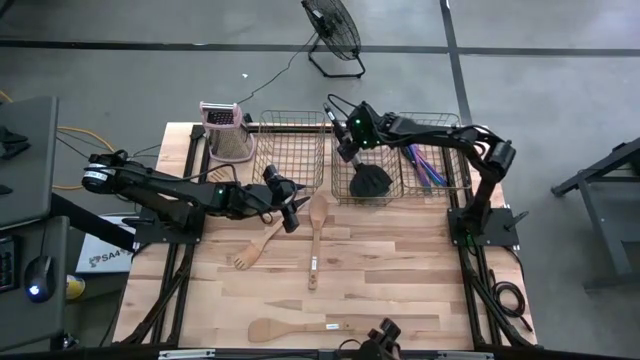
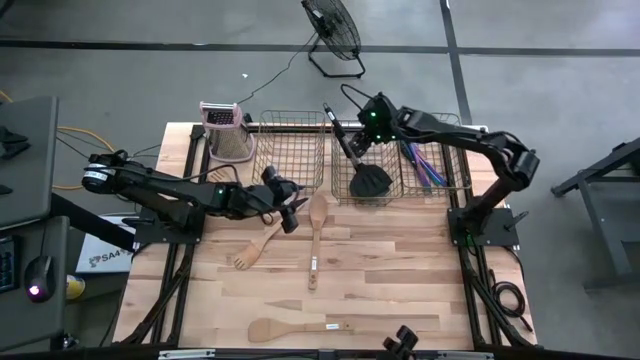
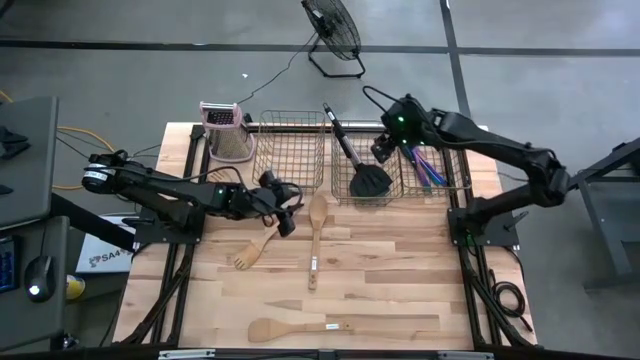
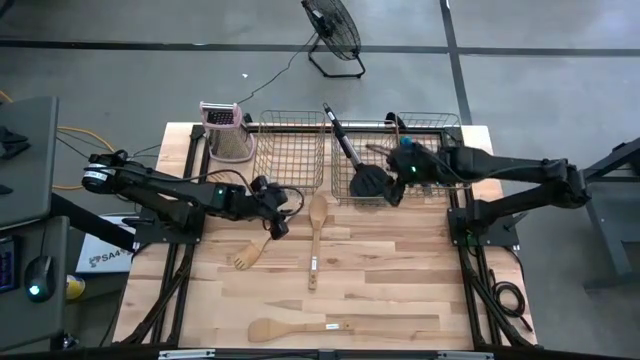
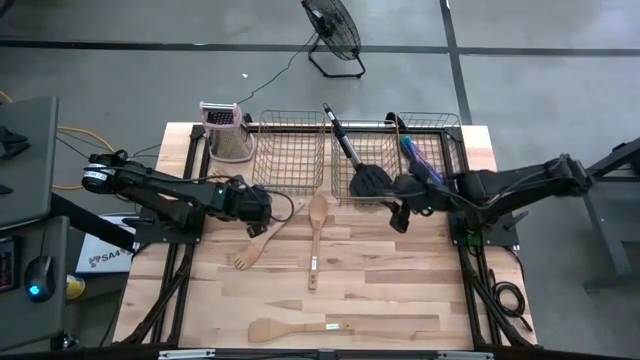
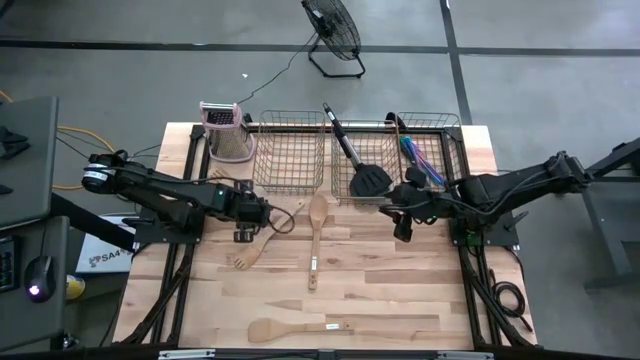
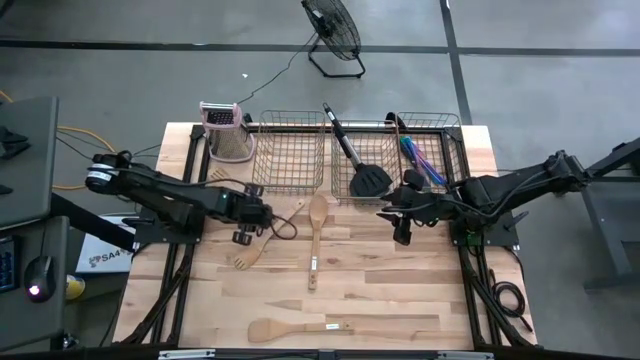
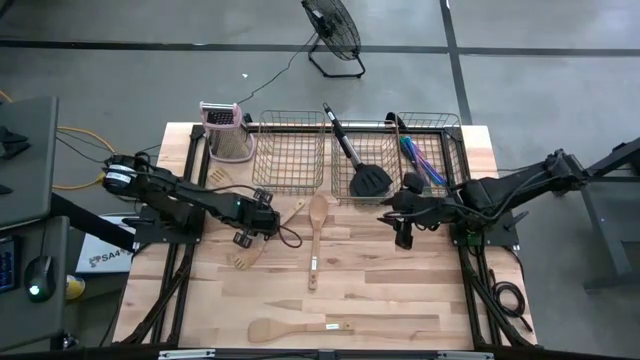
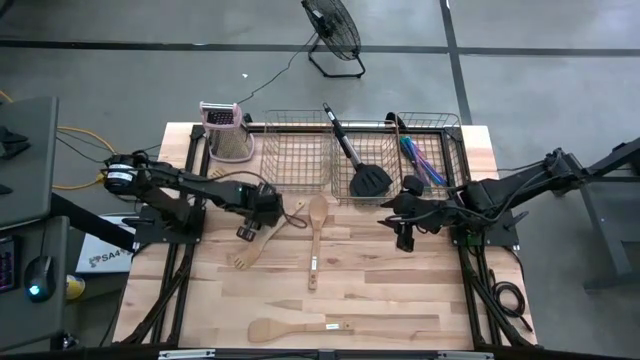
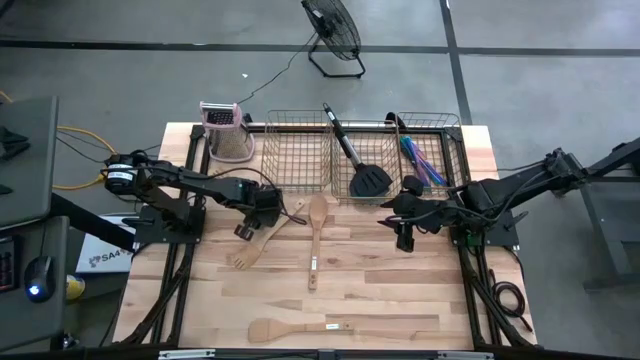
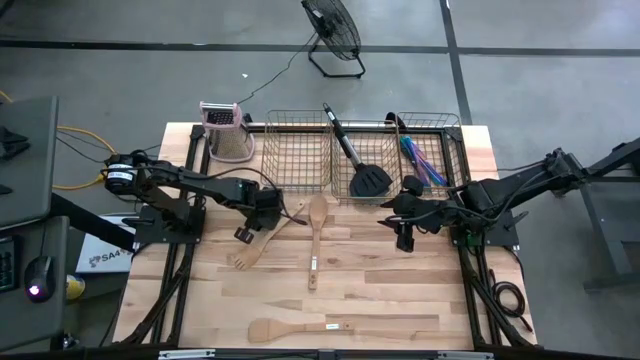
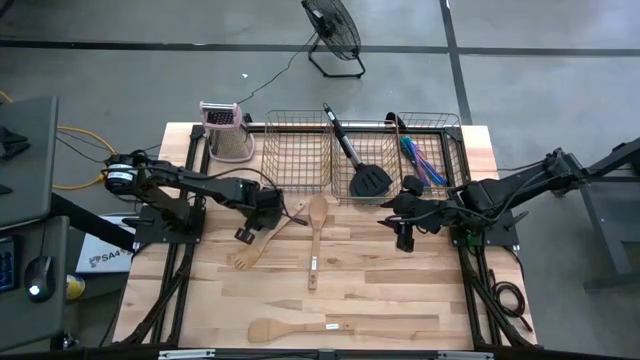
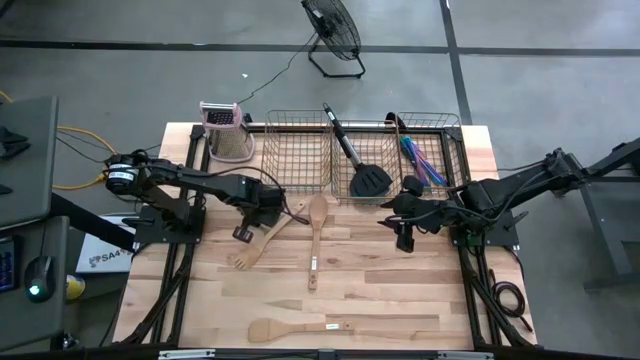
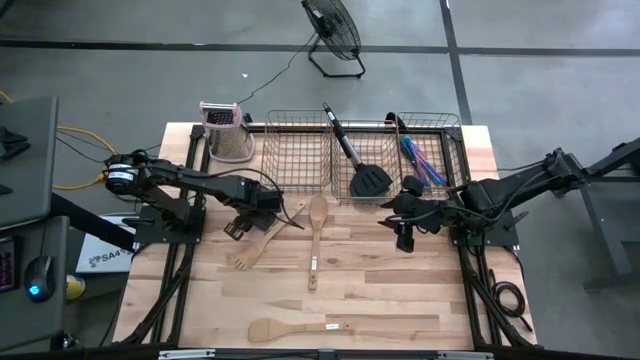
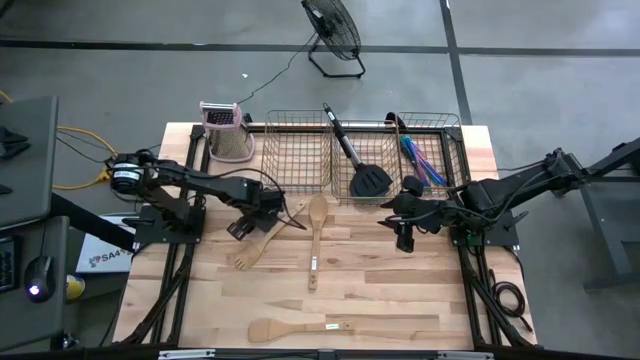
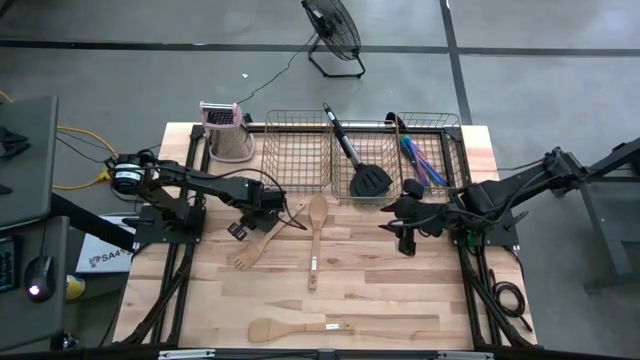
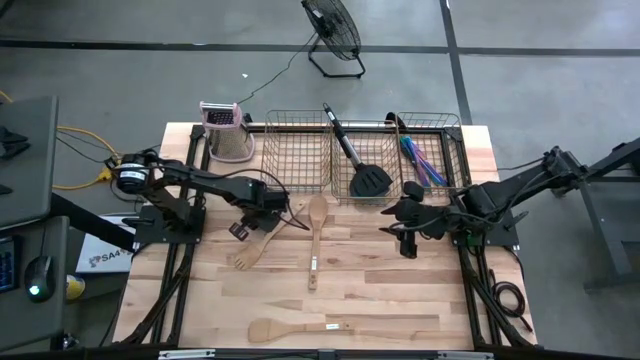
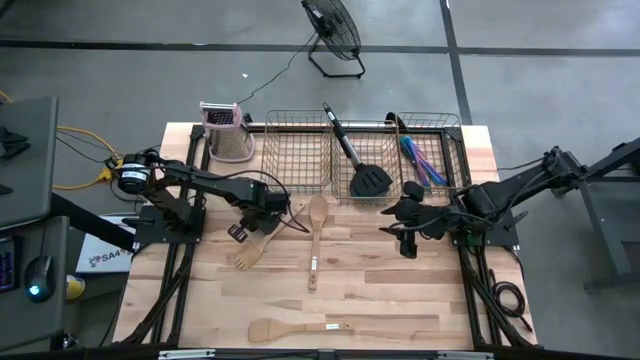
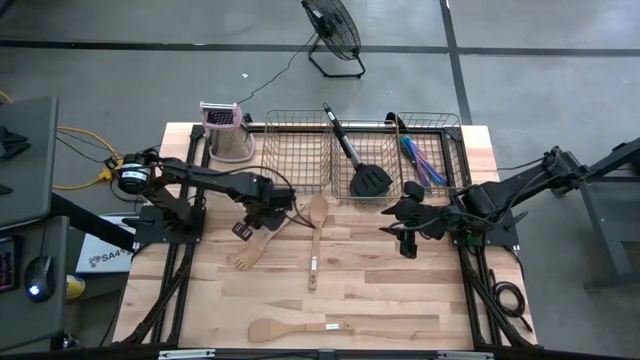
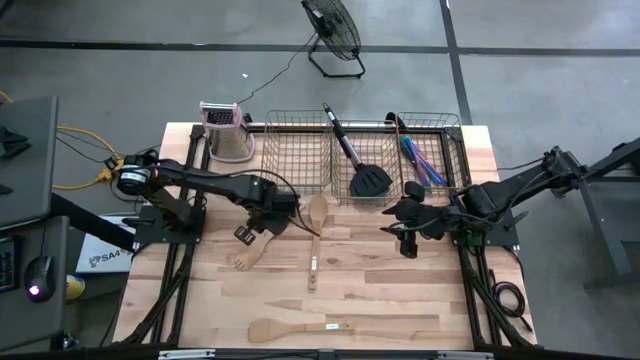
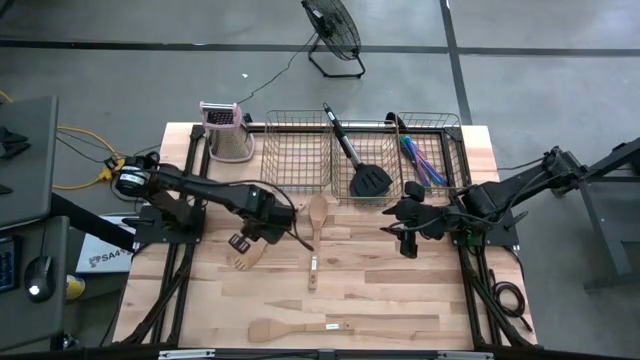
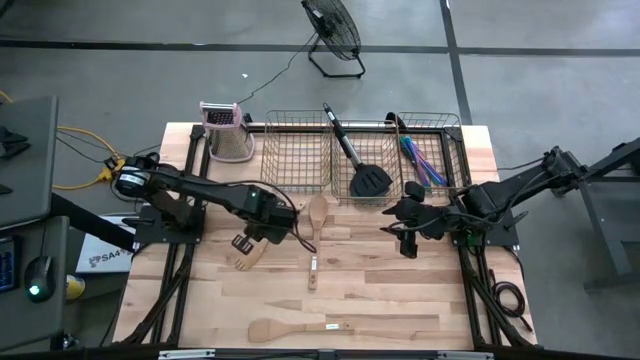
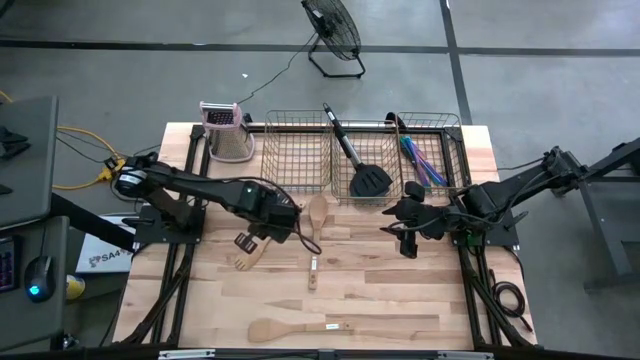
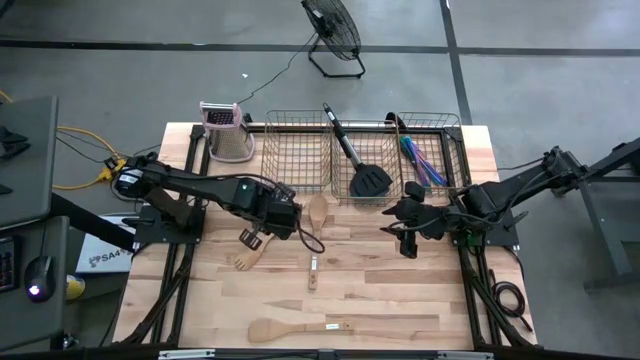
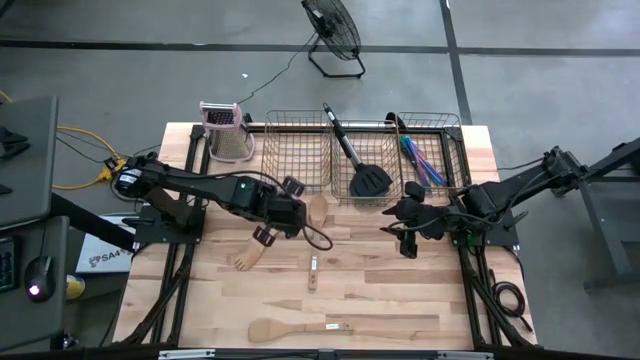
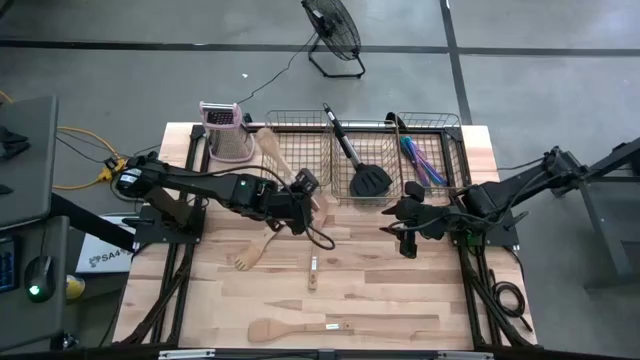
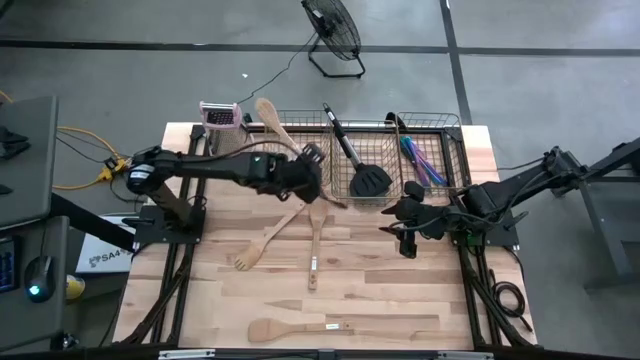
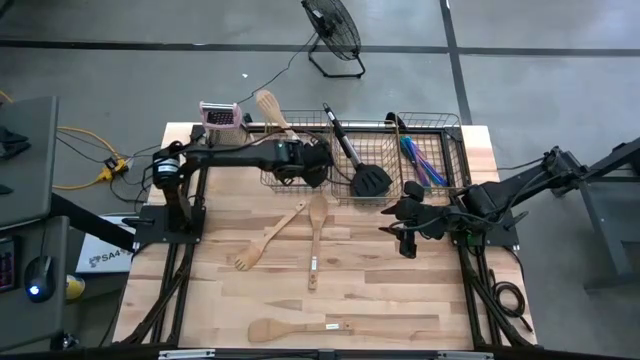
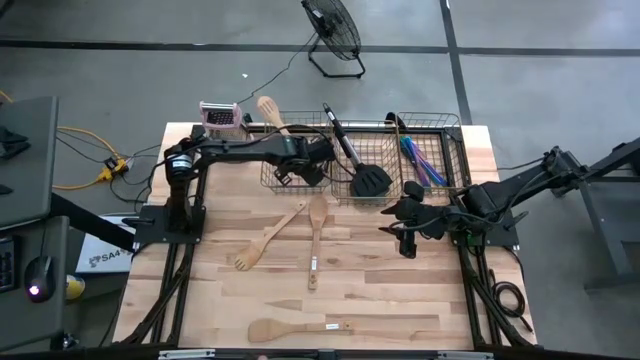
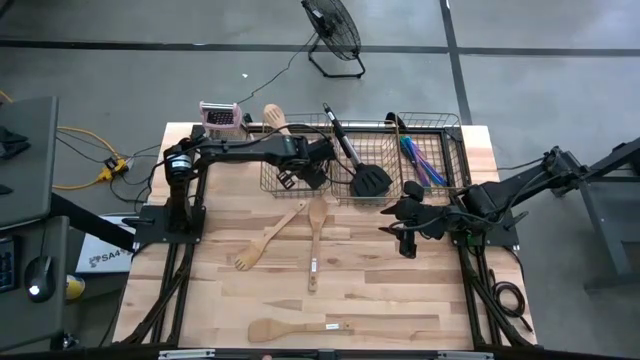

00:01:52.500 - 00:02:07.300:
Task: Pick & Place Kitchen Items
Put the wooden slotted turner spatula into the left mesh basket

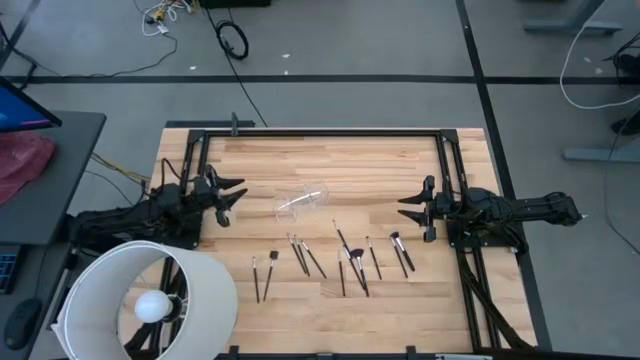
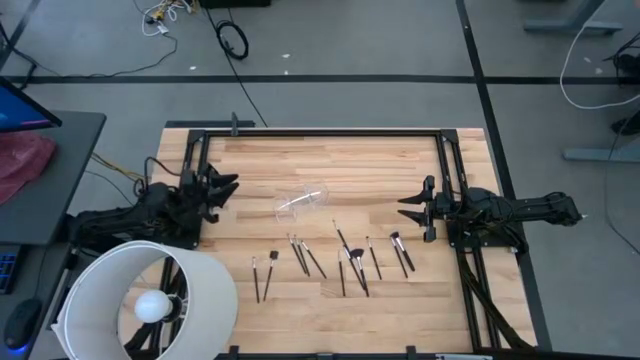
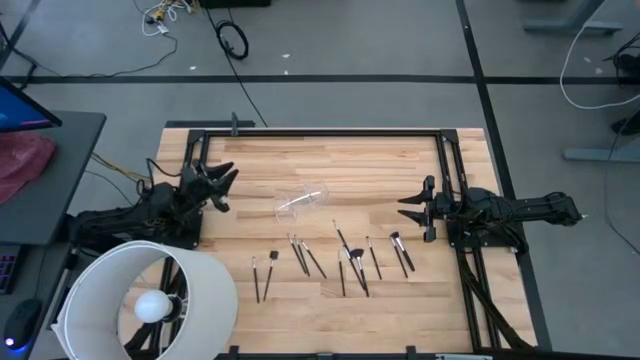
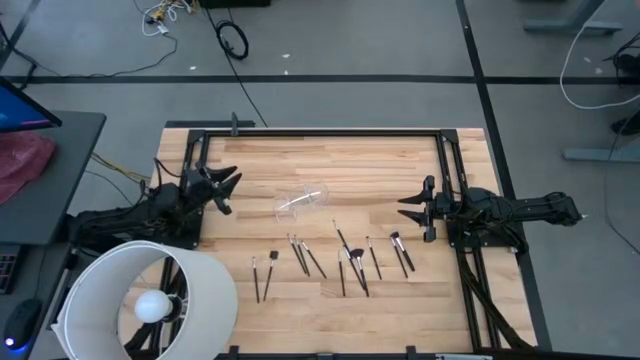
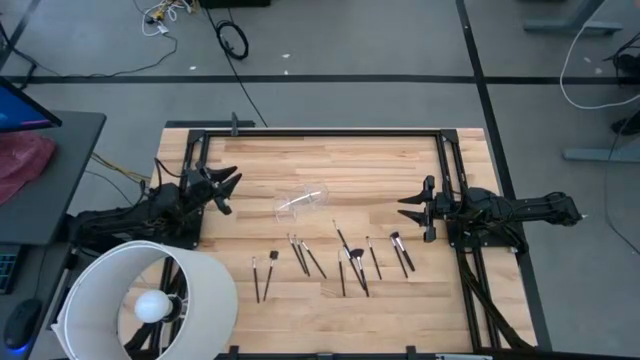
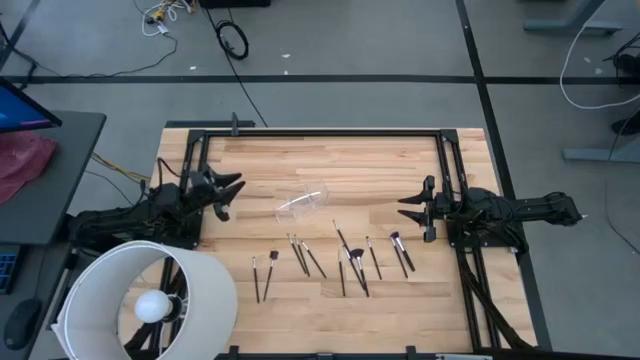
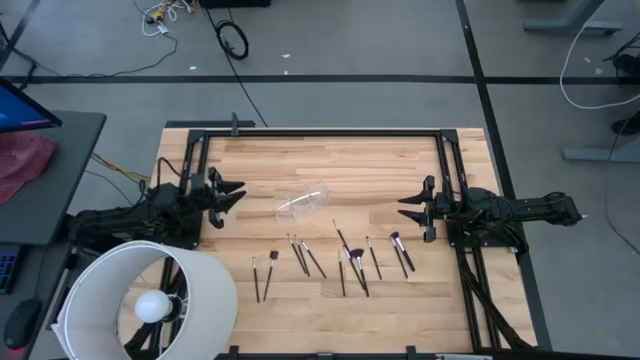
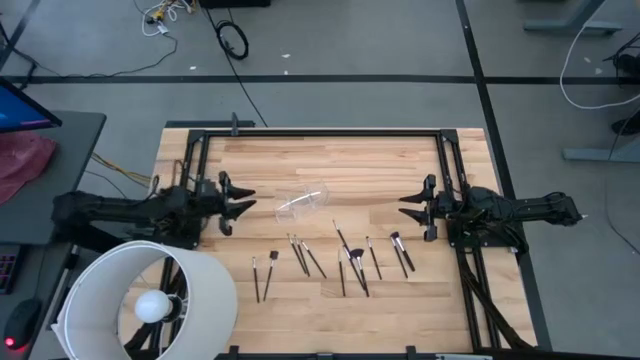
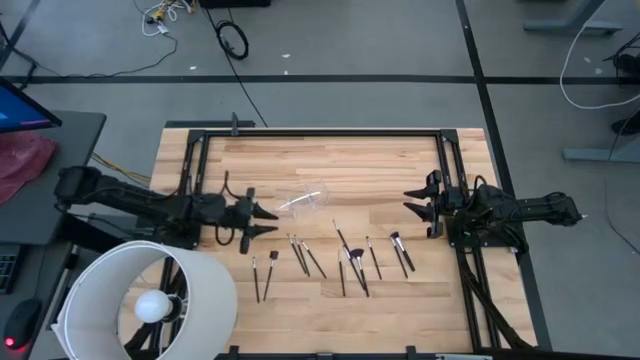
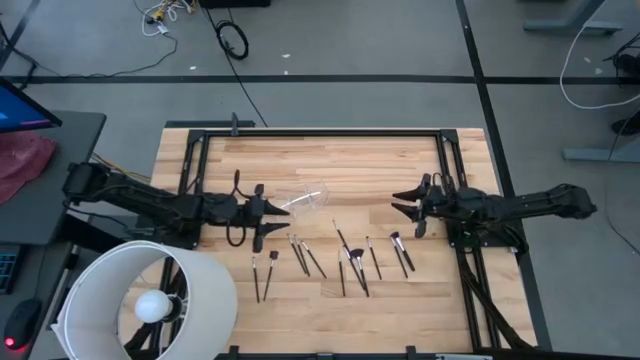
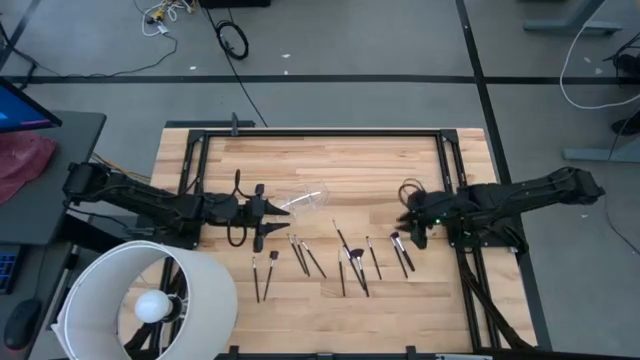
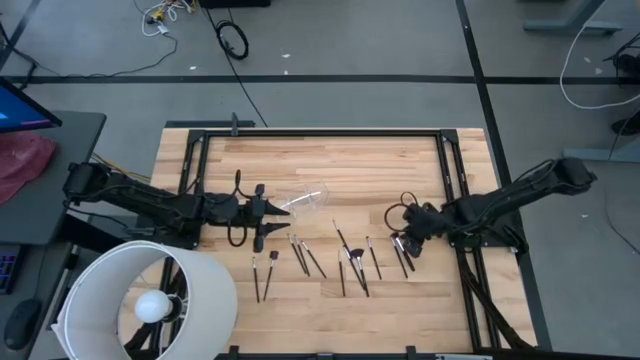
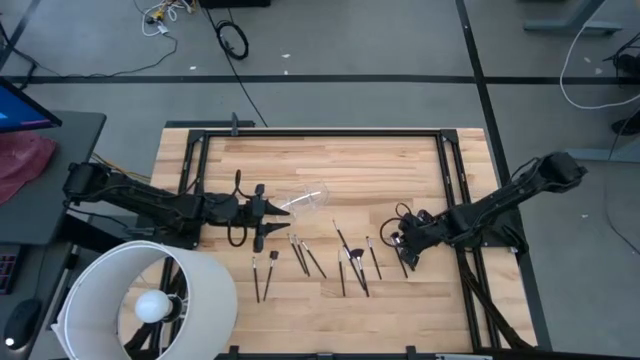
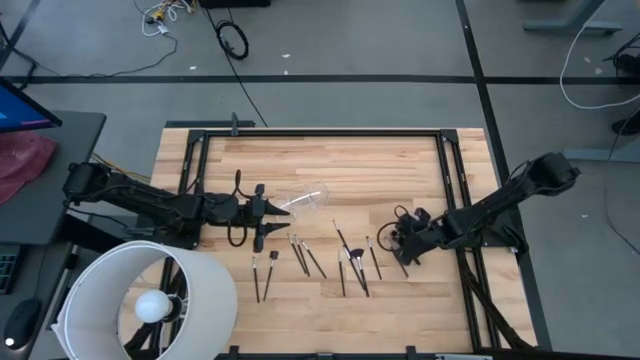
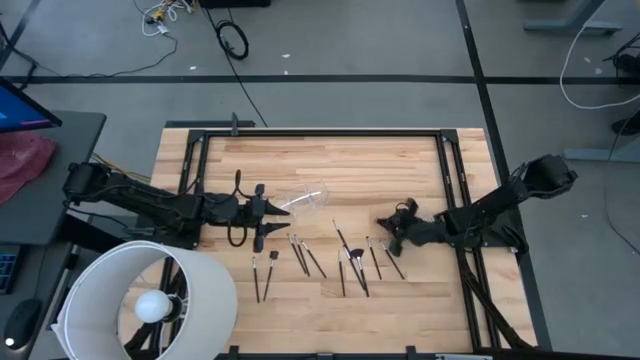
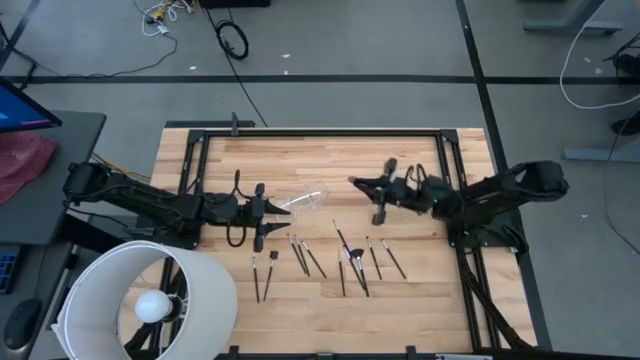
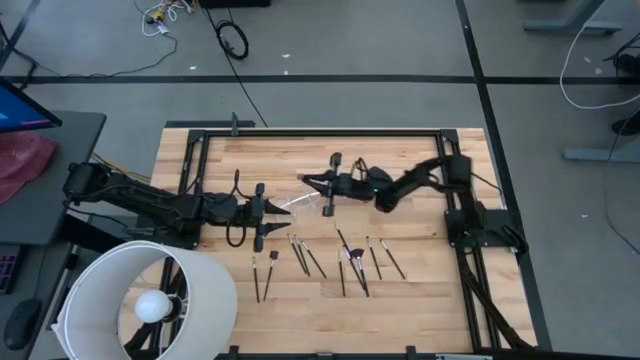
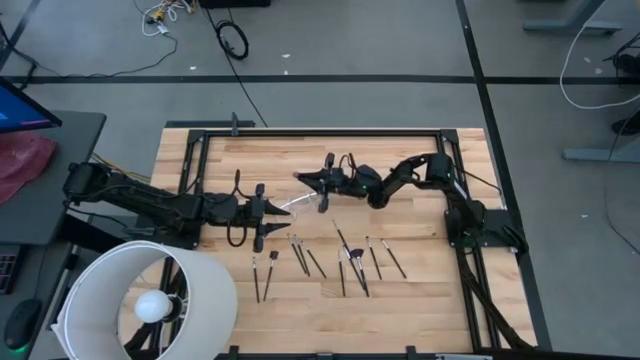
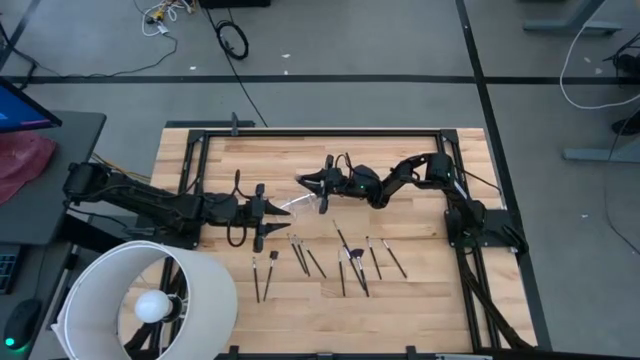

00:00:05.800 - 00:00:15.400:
Task: Put items in baskets/containers
Put the black blush brush into the transparent organizer
